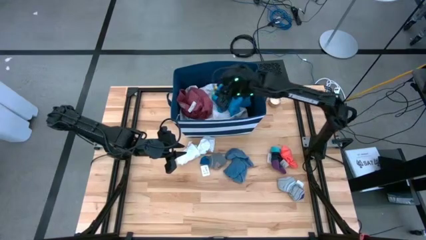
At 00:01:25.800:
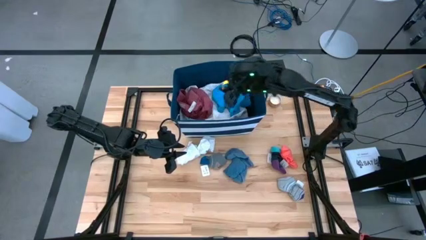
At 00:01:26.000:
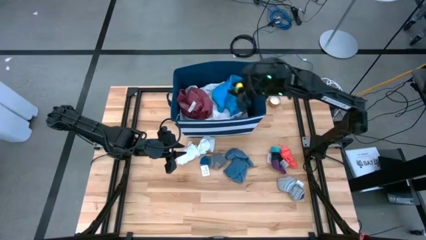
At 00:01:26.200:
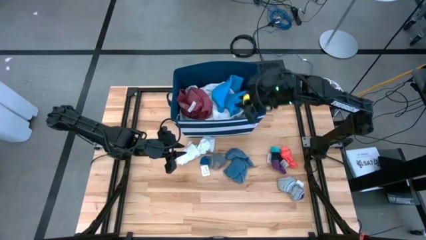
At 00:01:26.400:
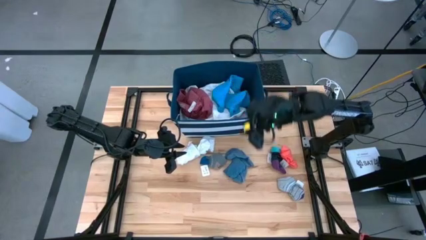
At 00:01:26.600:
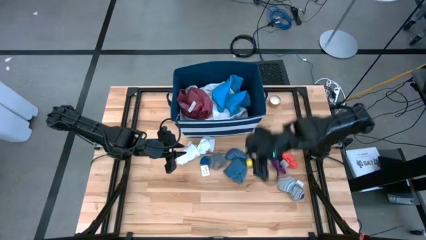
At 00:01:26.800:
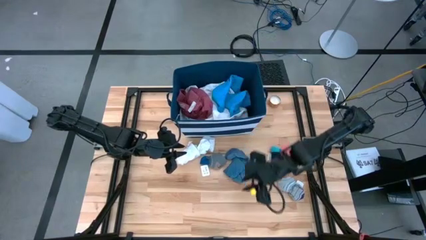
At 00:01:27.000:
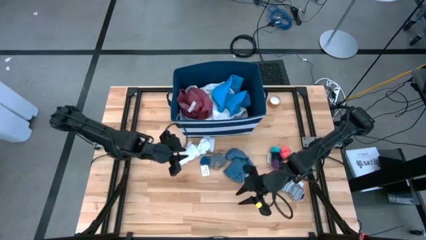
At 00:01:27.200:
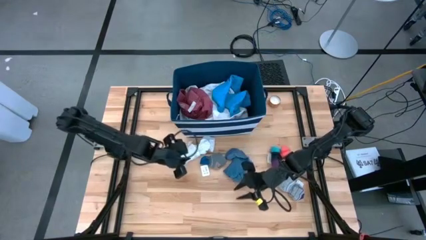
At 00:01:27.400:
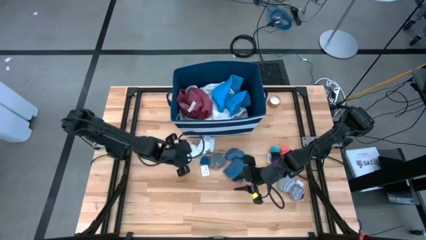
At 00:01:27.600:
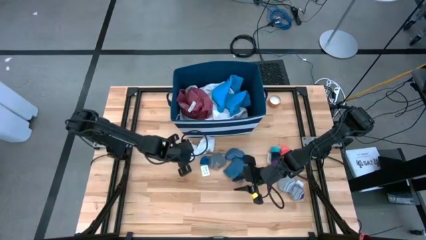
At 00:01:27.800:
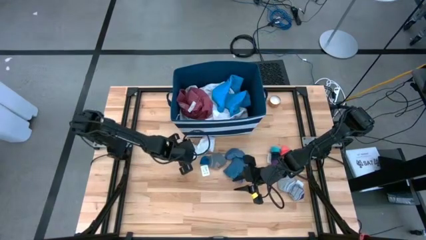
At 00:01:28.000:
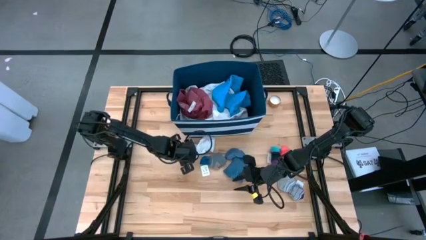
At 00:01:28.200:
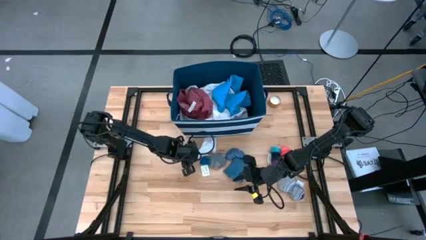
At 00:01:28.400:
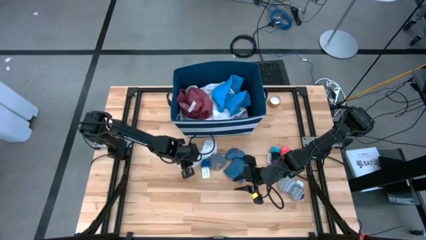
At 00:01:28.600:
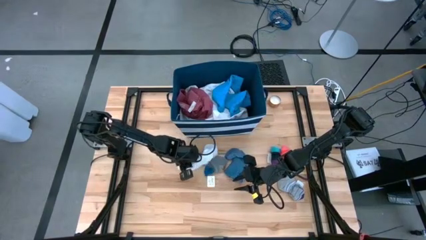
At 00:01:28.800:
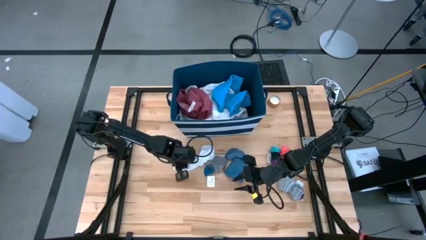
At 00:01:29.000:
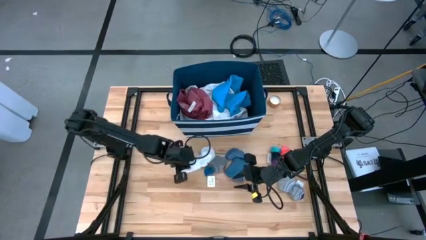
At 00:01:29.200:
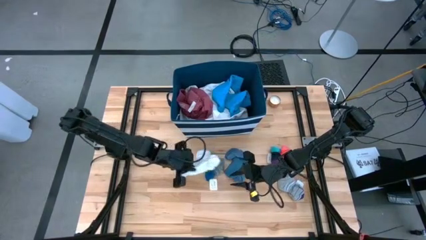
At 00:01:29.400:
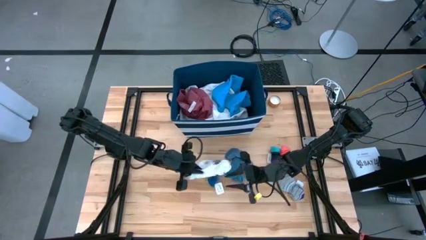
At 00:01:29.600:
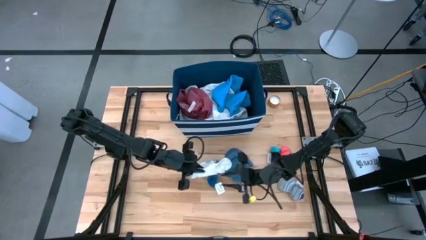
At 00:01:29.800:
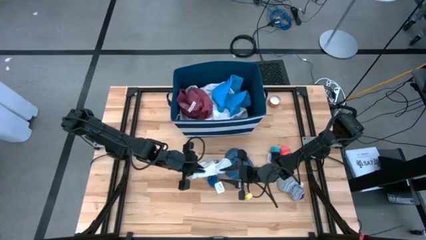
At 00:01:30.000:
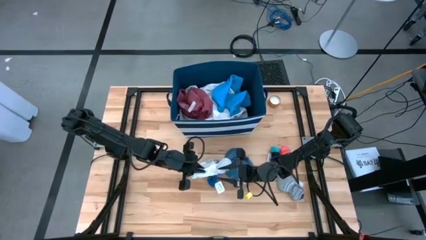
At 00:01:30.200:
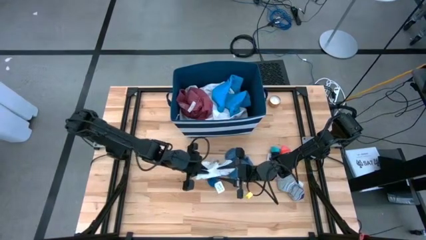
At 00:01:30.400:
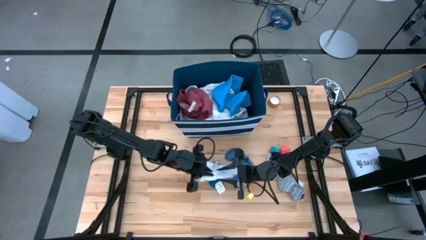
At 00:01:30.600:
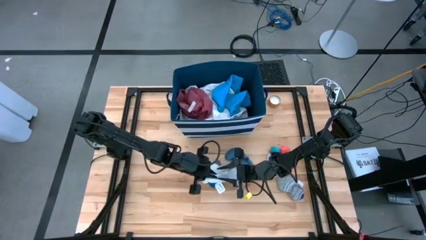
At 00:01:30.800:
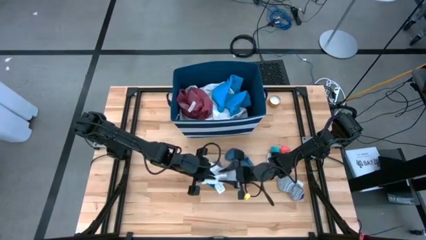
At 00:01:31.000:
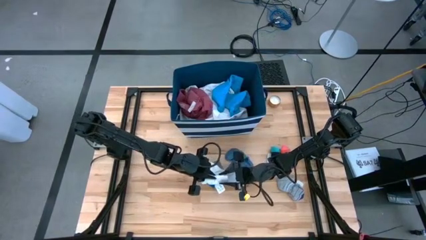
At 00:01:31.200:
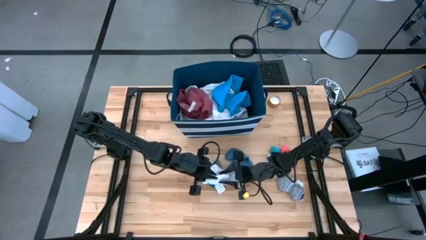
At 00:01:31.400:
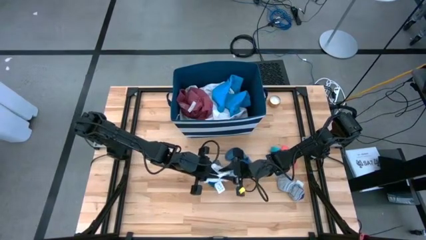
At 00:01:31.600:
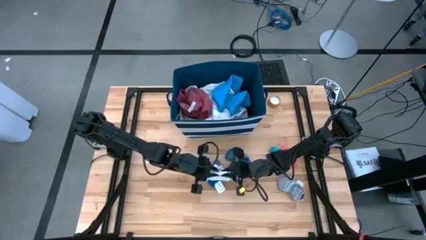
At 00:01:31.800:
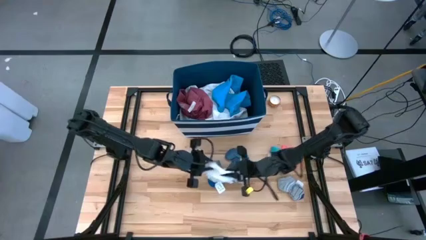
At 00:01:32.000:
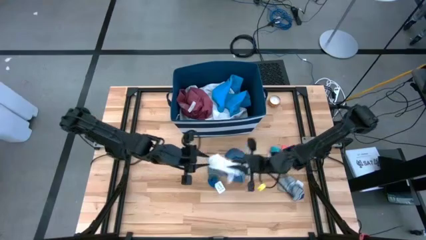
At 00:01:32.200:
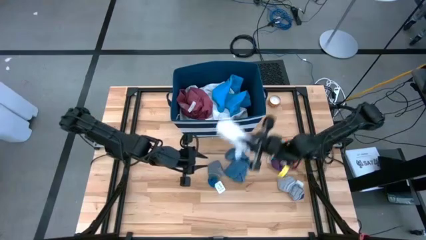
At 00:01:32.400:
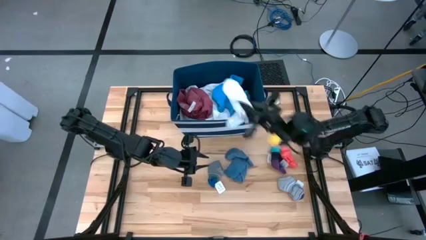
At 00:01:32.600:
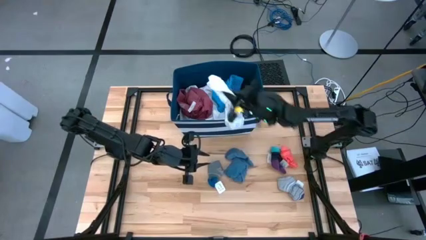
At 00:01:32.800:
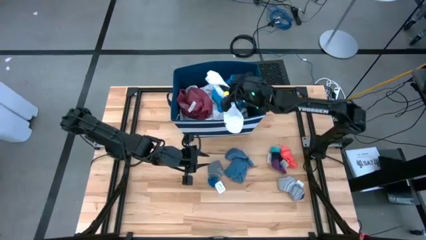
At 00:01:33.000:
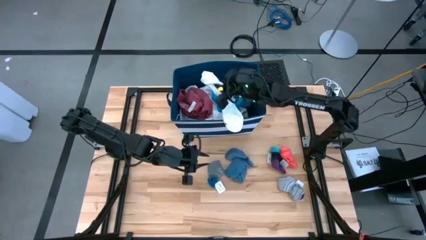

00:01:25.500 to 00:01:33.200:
Task: Sort clothes
Put the white socks into the blue bin

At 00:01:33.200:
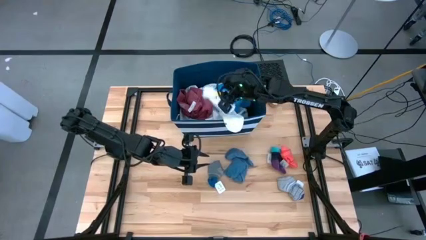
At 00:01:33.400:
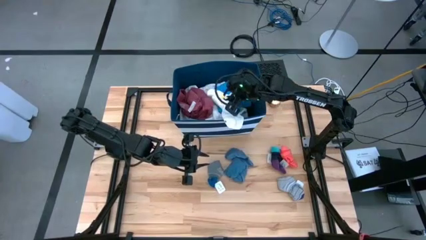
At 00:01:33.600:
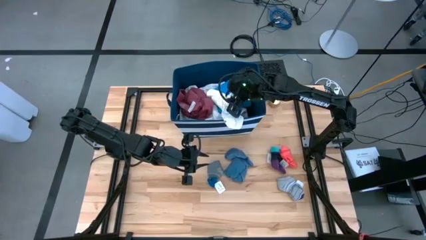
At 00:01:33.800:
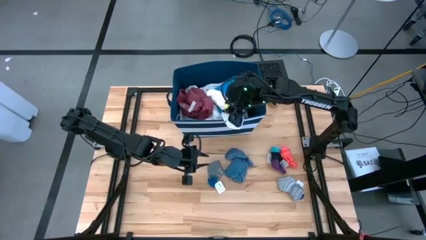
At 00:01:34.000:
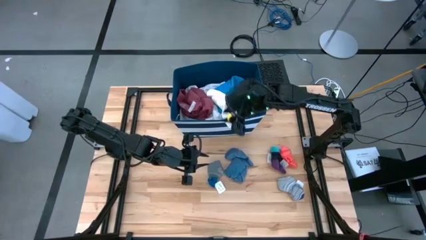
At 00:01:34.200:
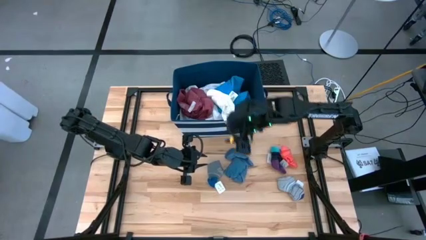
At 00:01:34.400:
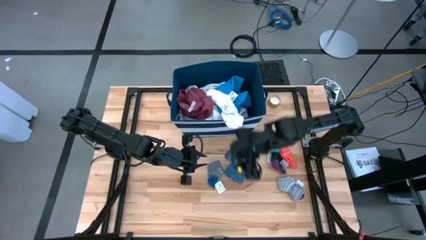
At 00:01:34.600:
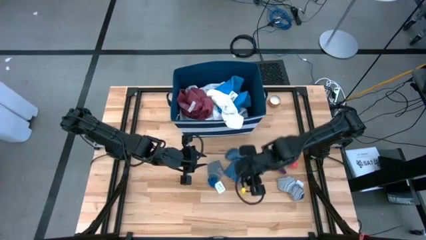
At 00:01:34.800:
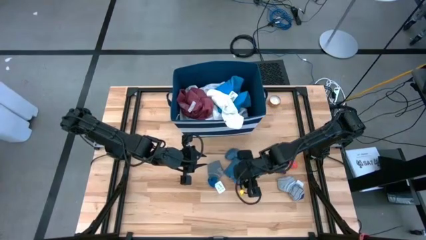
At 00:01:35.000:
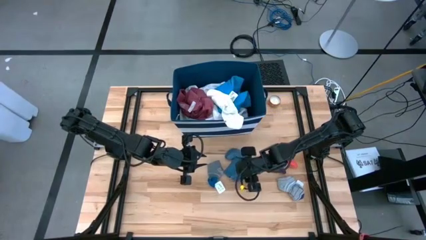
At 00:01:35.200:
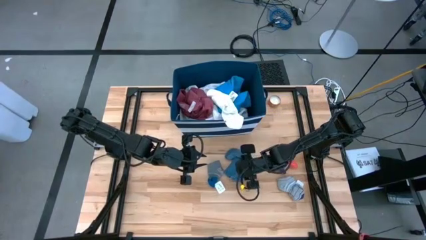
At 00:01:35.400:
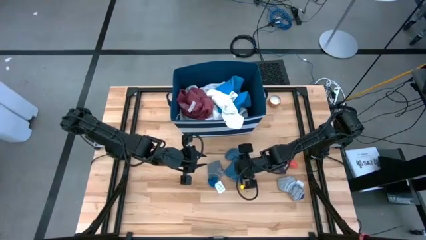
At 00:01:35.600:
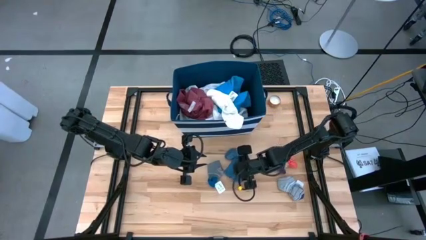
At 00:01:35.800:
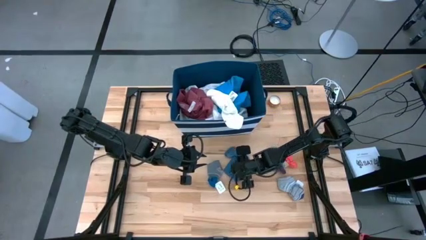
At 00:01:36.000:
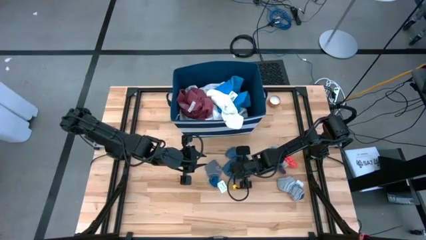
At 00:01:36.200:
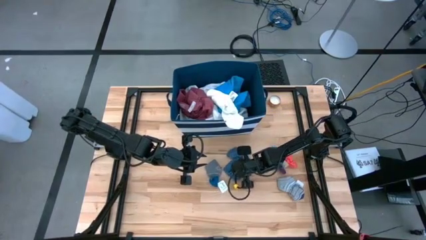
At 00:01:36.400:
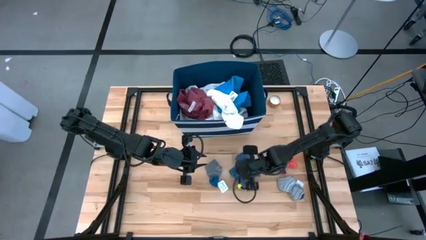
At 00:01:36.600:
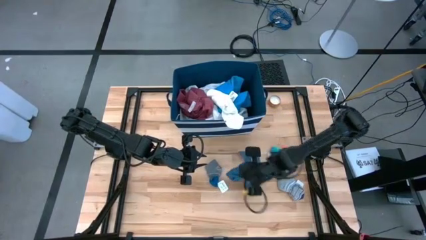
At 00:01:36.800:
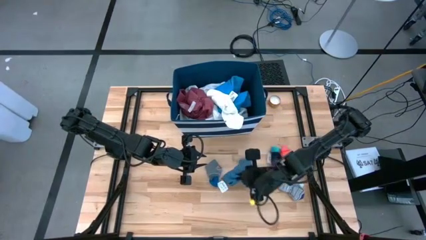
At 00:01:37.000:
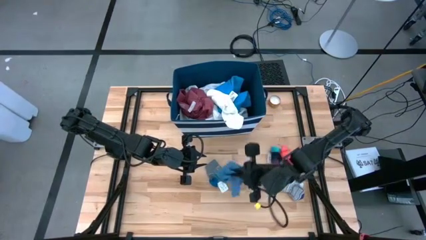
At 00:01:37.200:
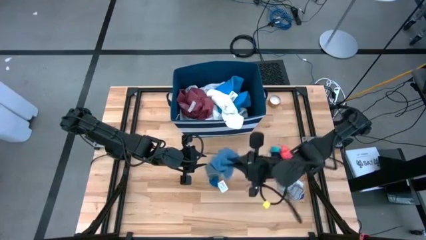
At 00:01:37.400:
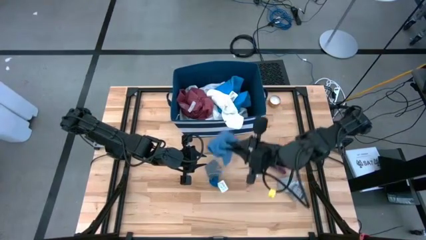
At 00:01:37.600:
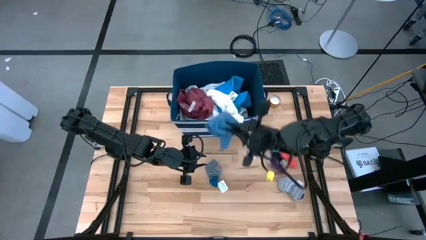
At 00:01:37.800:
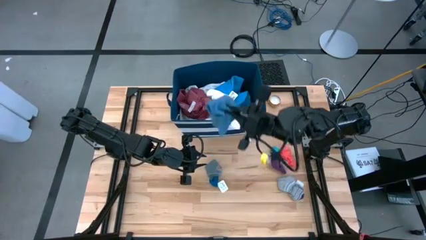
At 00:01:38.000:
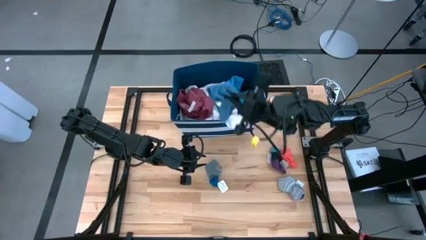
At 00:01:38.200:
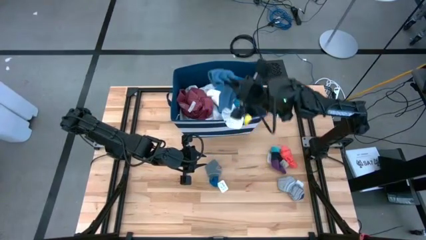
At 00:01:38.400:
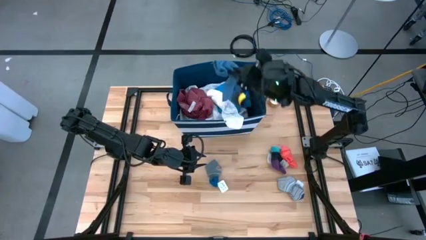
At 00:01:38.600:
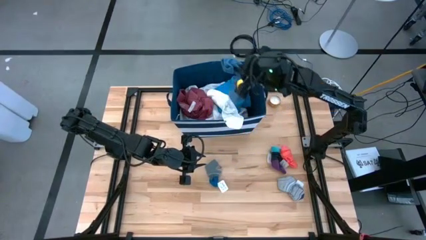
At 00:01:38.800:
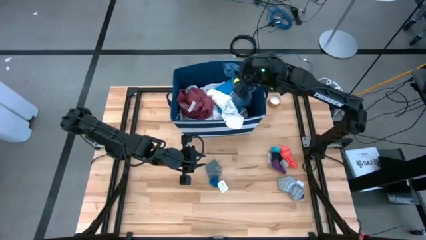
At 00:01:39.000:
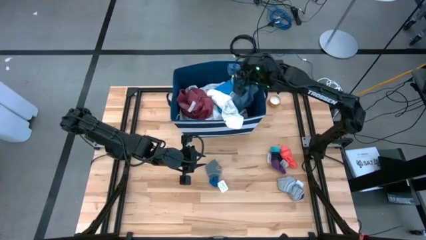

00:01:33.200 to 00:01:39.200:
Put the right blue socks into the blue bin

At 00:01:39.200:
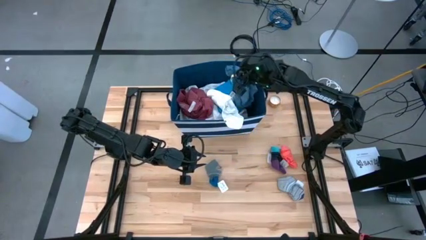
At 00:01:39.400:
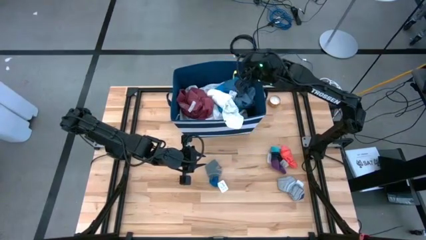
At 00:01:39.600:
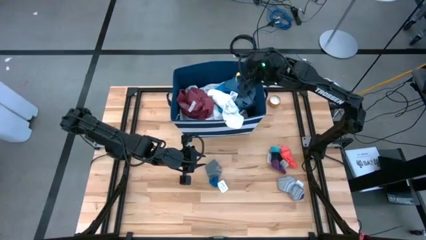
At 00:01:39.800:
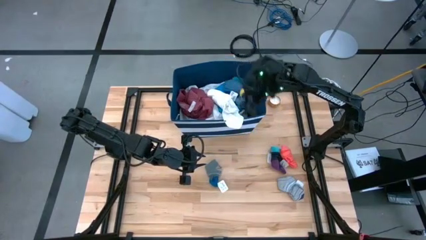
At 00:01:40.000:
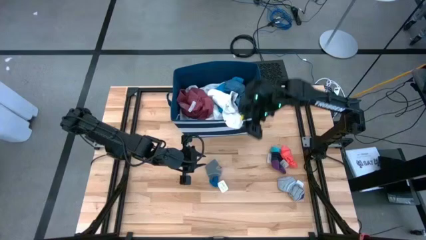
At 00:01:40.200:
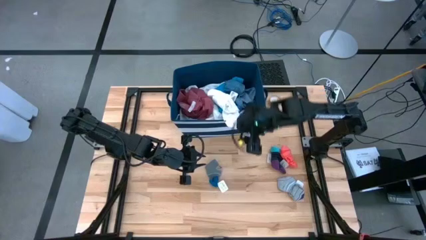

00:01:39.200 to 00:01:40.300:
Put the blue sock into the blue bin

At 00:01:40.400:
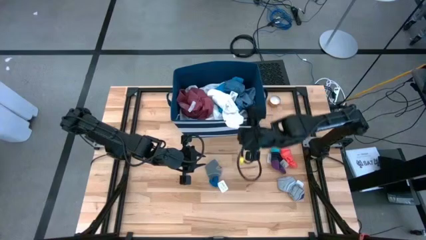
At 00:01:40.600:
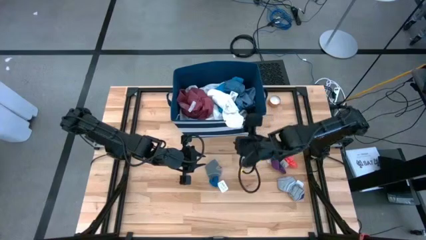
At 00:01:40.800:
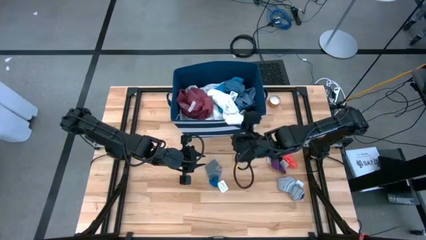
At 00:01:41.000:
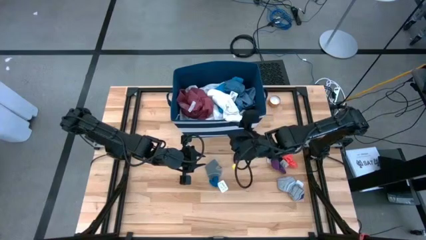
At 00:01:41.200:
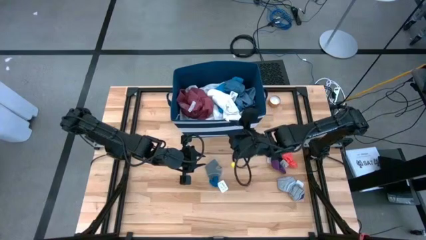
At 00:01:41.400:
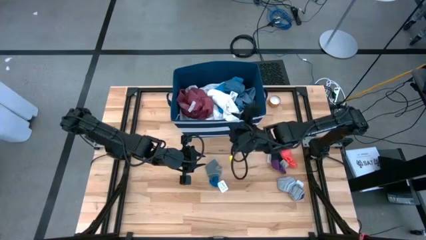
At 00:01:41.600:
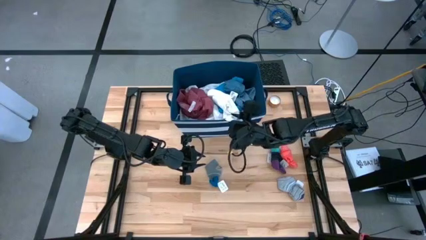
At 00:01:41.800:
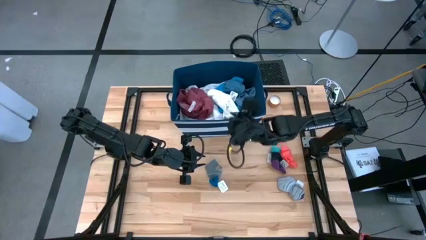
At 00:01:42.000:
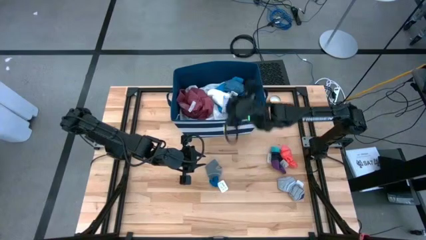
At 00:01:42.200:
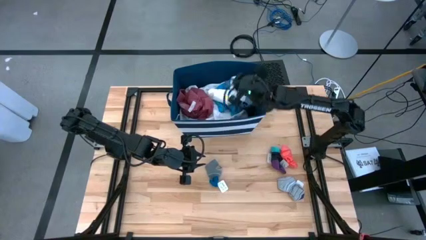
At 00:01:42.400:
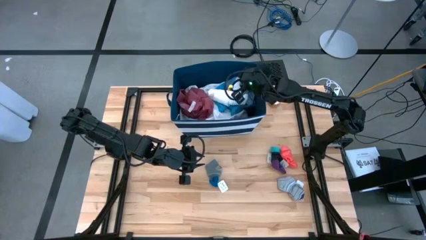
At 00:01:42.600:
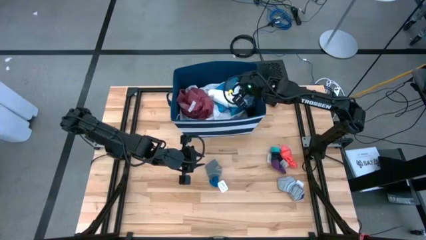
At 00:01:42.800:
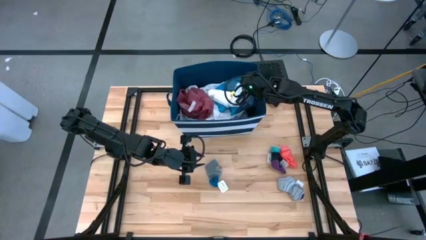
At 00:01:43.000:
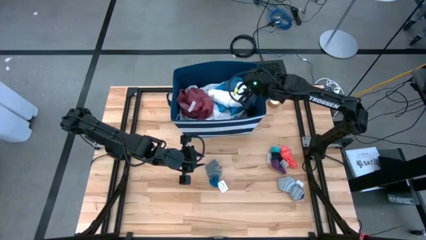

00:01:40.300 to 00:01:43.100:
Put the white socks into the blue bin
